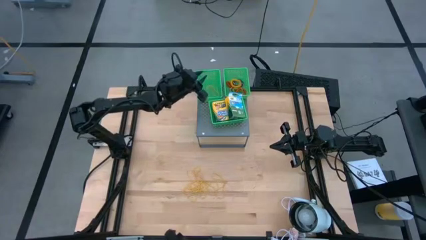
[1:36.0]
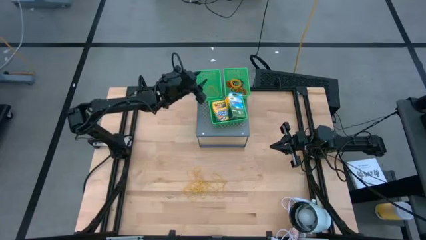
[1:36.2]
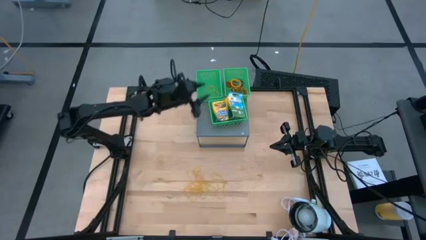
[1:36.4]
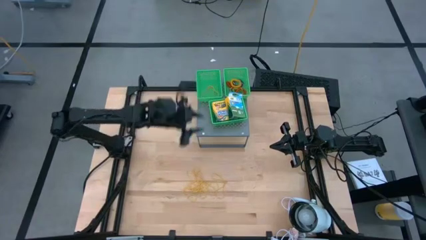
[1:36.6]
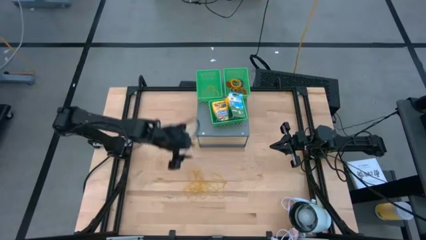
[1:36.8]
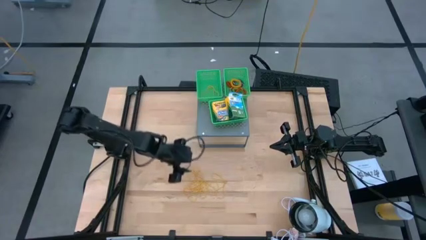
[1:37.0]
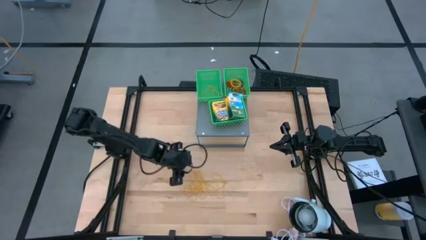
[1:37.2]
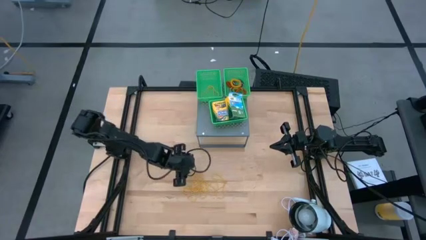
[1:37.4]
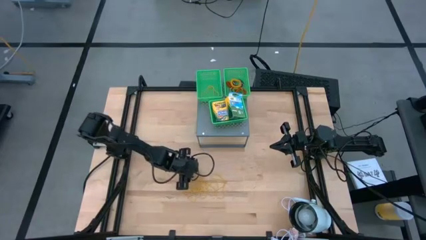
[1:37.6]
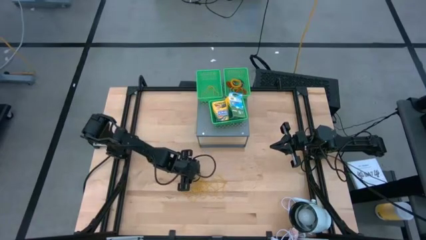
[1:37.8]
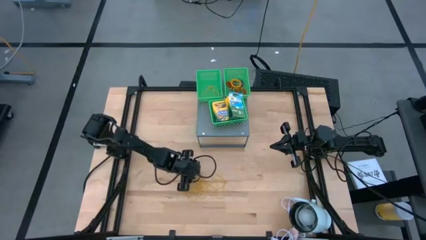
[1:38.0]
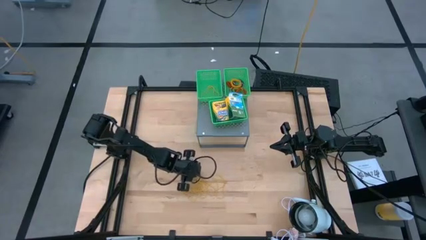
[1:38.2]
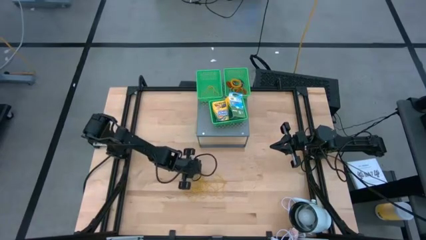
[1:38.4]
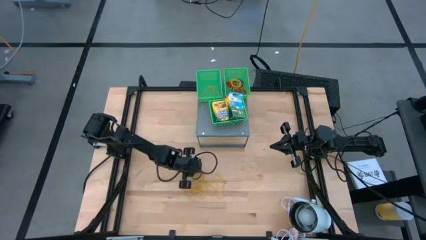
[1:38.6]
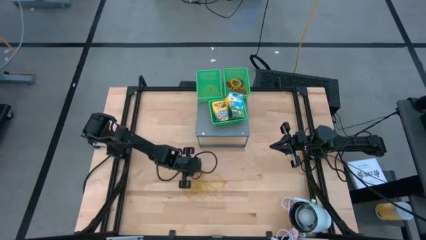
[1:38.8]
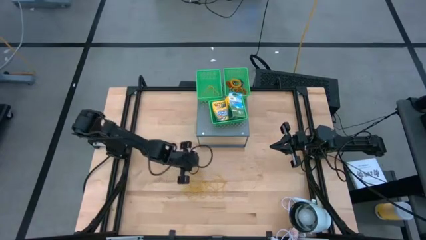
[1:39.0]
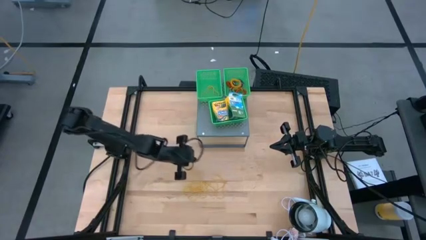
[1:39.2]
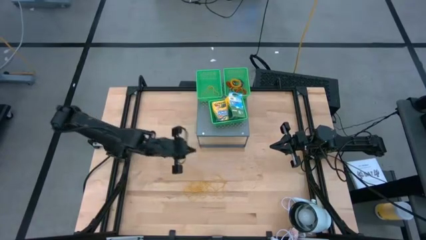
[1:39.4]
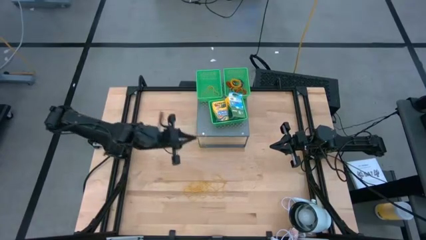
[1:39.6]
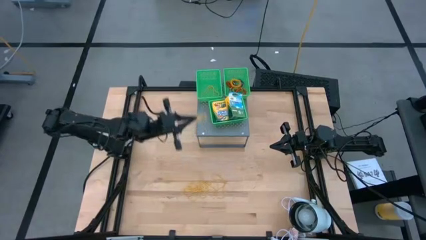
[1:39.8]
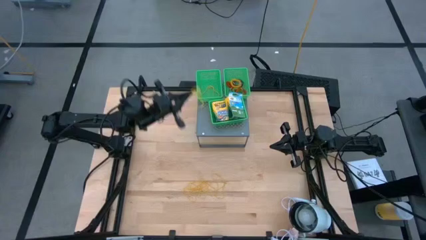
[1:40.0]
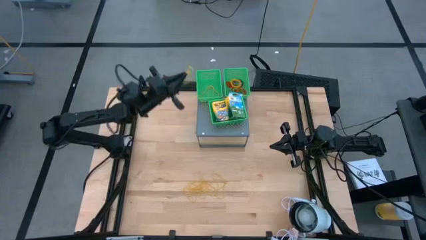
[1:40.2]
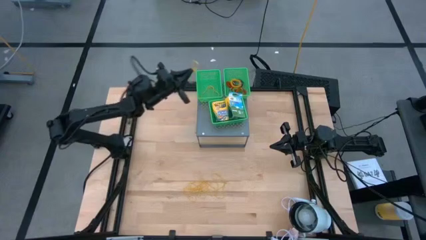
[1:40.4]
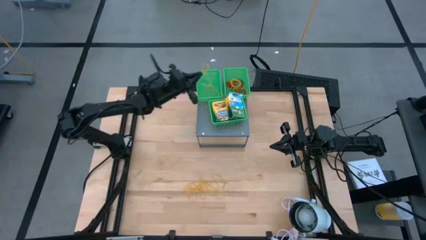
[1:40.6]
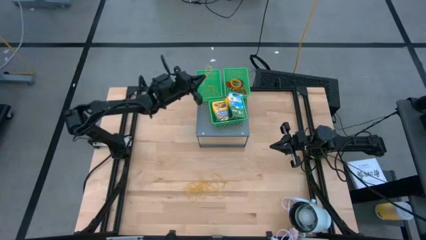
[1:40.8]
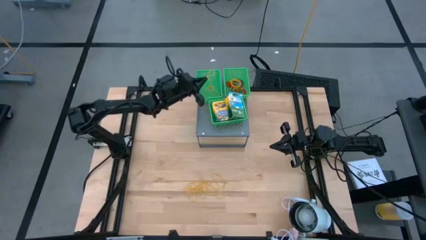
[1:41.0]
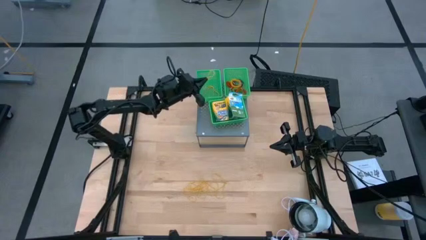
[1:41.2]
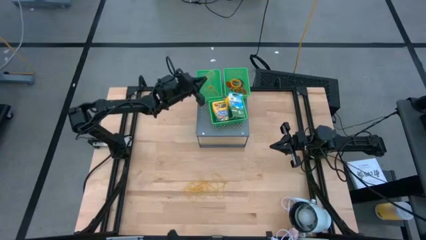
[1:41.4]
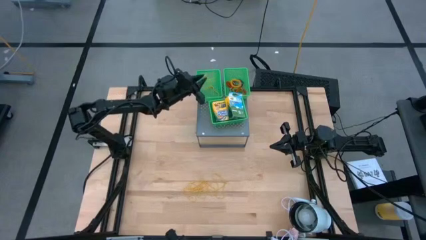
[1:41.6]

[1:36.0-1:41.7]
Task: Pick & Place Office Desk Supplies
Put the yellow rubber band into the left green bin on the shelf

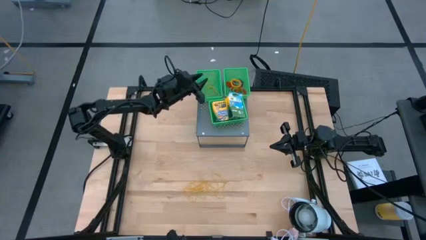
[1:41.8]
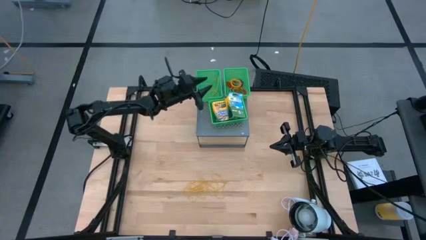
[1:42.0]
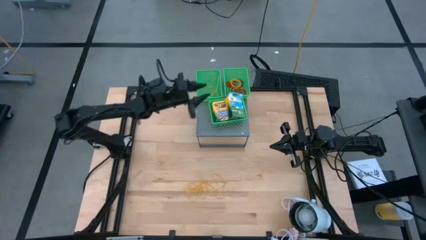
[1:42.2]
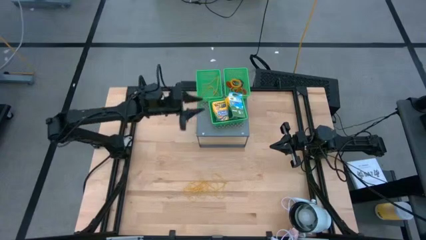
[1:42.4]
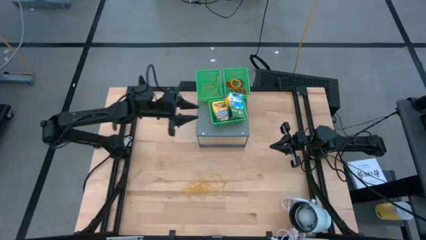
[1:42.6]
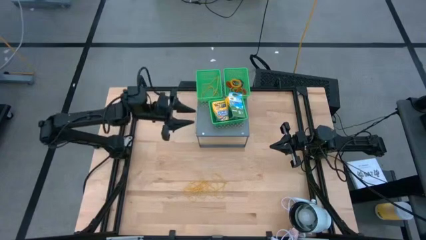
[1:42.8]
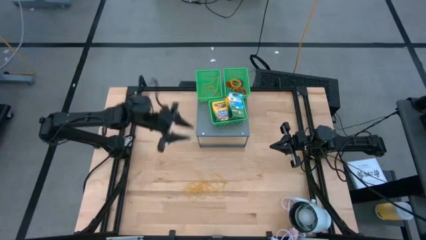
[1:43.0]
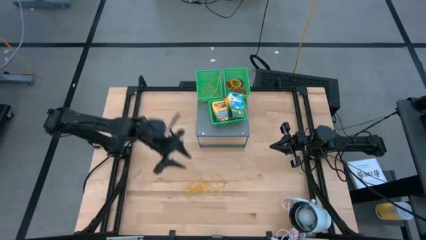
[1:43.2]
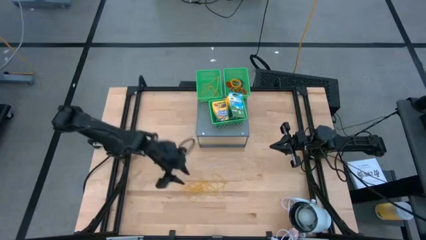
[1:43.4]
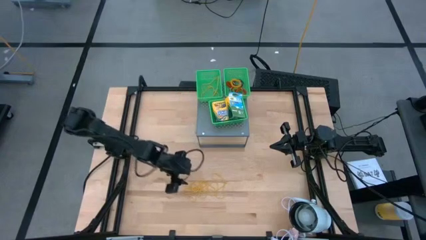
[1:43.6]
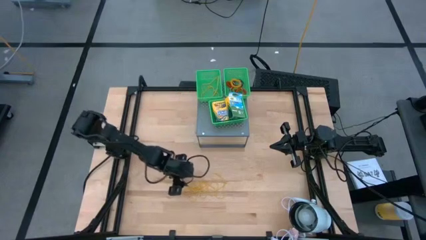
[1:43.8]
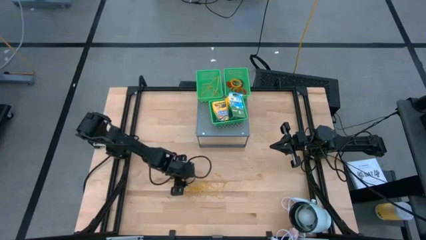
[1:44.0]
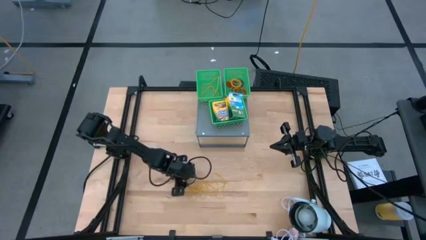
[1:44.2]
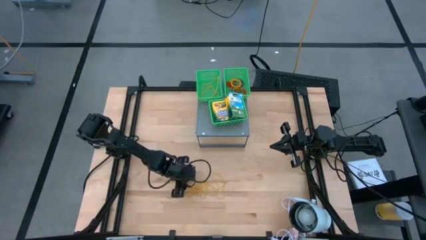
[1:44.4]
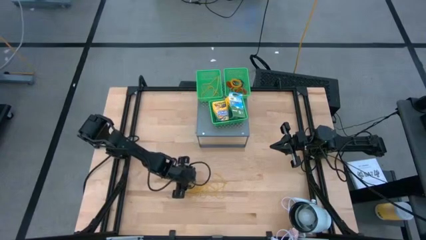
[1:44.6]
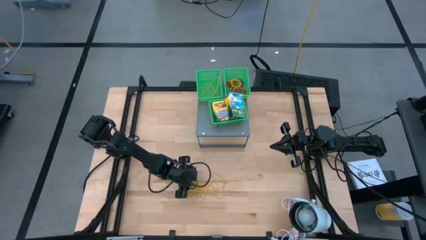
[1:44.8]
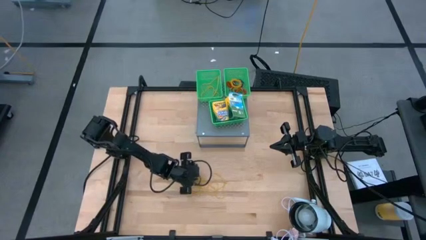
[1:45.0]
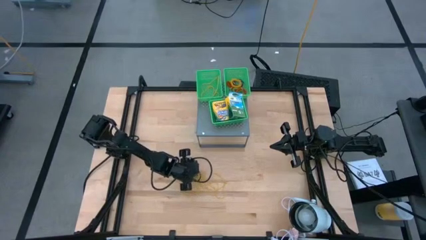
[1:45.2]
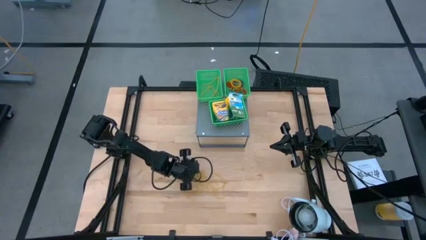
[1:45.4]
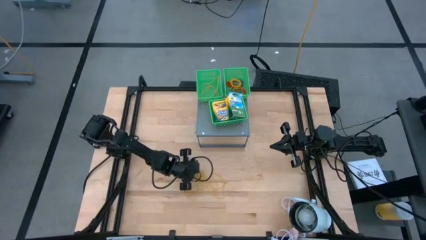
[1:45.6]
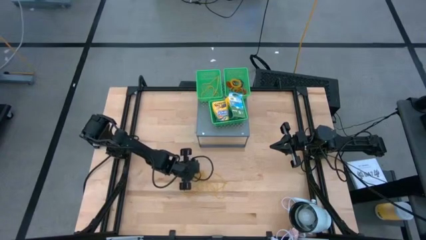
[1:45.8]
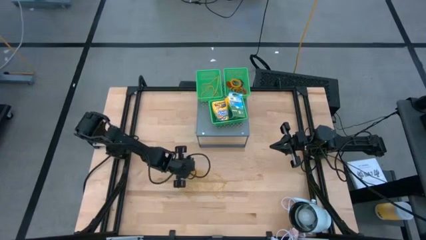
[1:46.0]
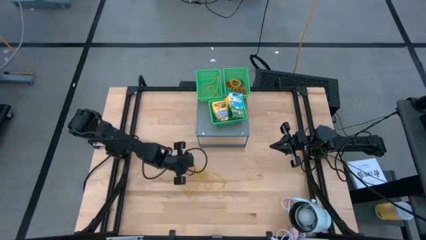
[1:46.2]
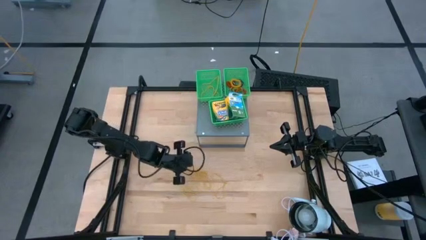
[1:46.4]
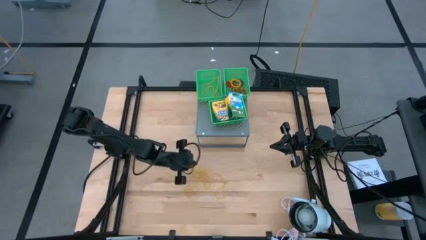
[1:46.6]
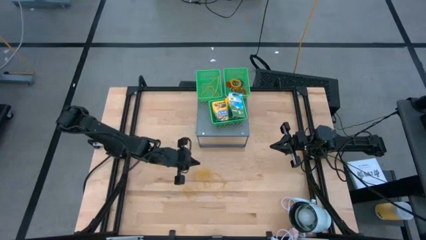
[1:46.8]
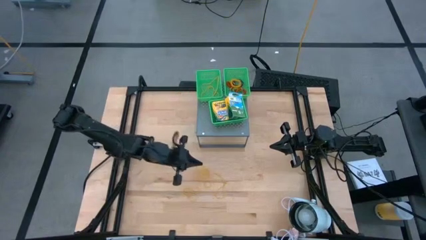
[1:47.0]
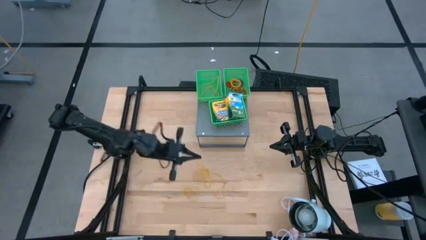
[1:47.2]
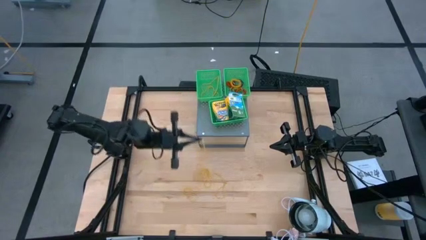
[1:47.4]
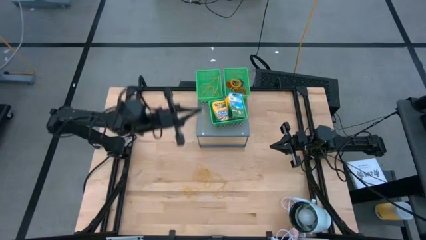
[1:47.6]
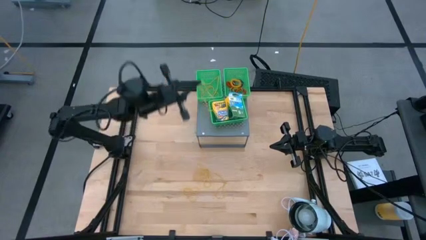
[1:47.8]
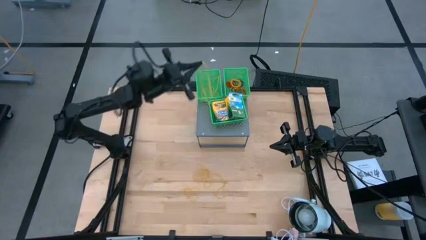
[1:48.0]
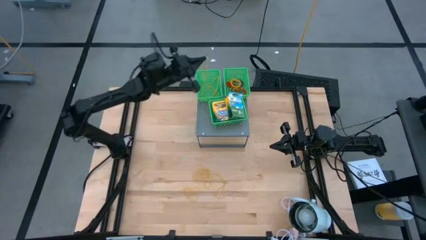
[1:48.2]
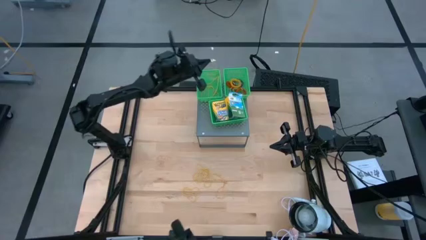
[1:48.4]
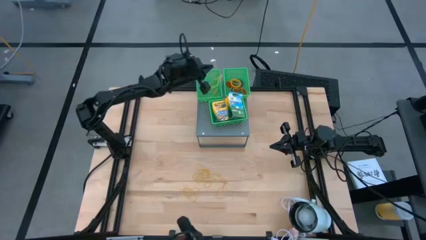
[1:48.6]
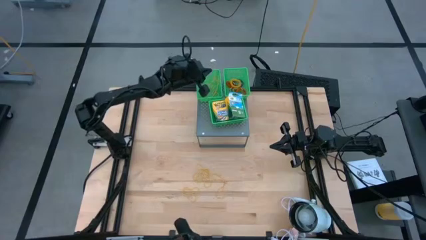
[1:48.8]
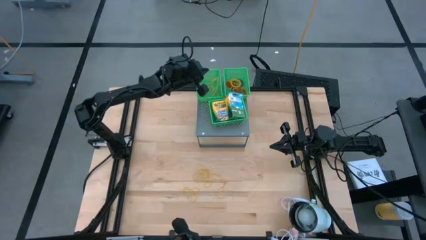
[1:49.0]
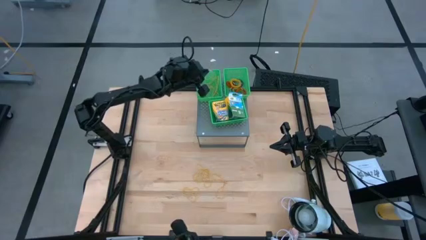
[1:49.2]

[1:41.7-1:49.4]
Put the yellow rubber band into the left green bin on the shelf

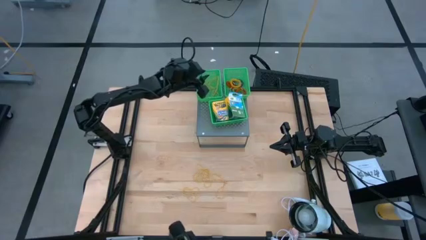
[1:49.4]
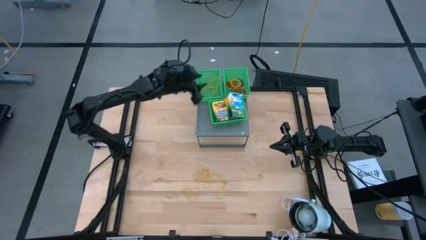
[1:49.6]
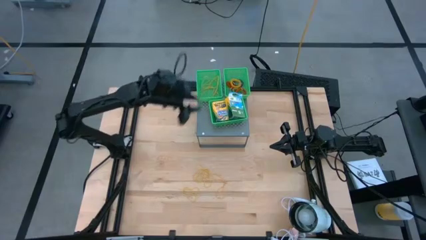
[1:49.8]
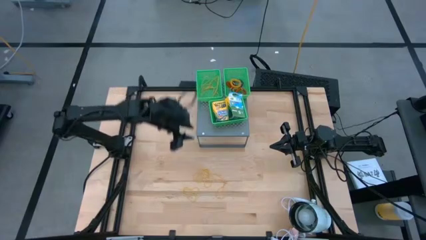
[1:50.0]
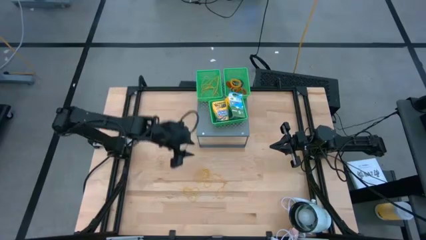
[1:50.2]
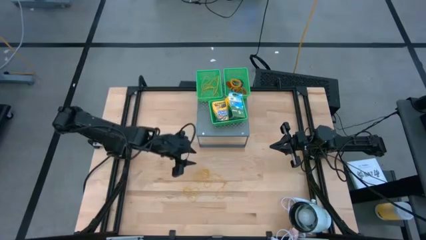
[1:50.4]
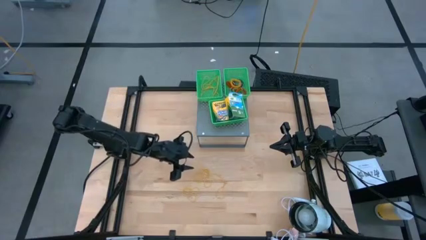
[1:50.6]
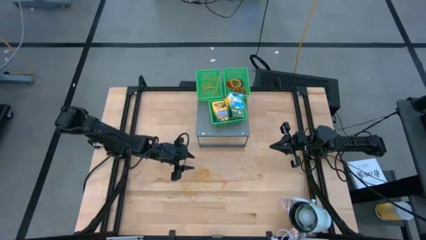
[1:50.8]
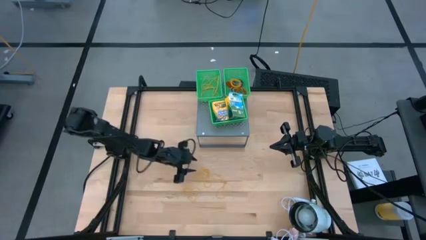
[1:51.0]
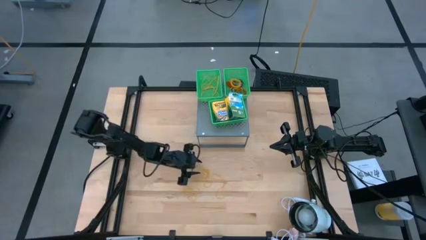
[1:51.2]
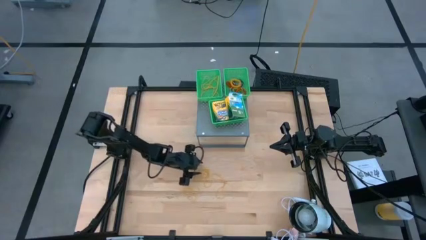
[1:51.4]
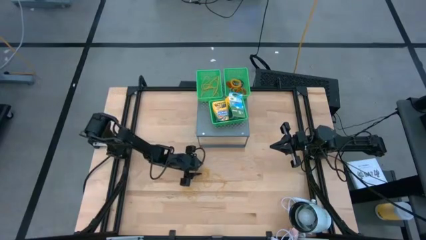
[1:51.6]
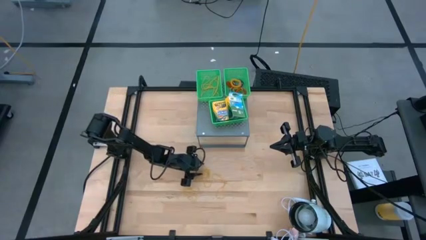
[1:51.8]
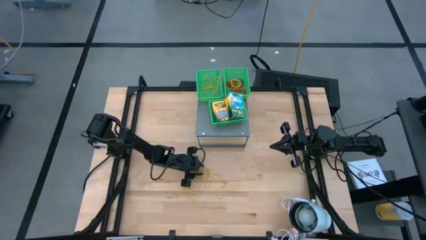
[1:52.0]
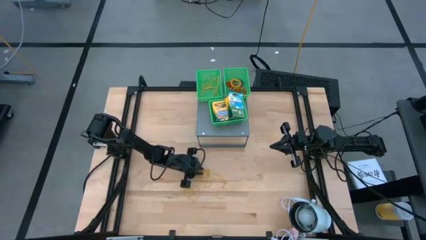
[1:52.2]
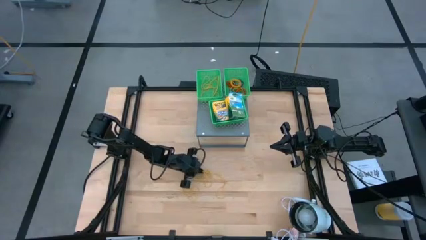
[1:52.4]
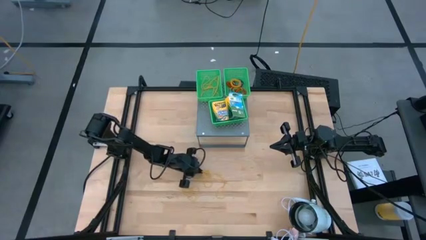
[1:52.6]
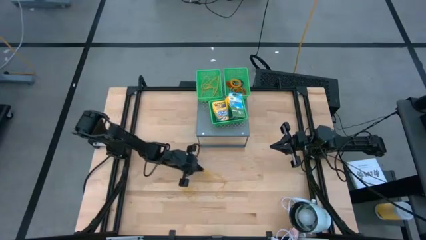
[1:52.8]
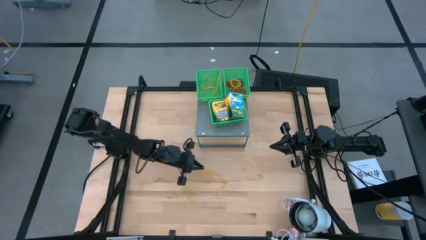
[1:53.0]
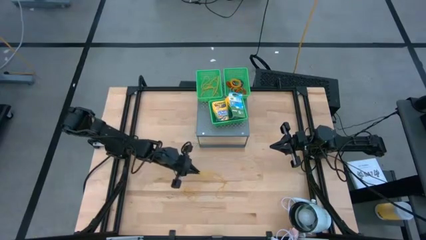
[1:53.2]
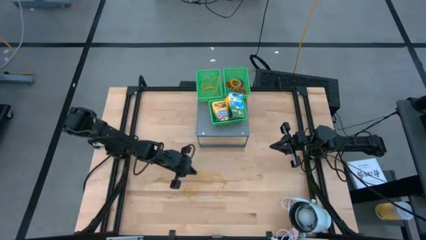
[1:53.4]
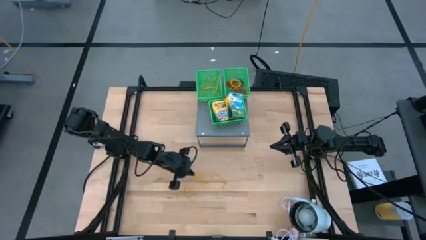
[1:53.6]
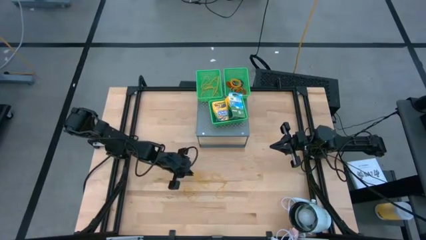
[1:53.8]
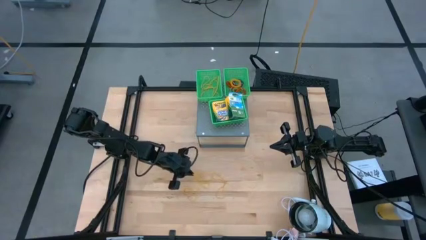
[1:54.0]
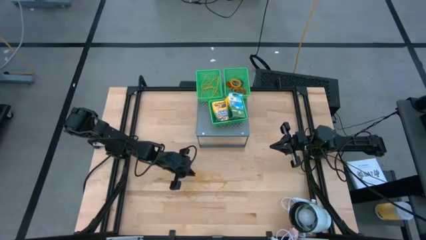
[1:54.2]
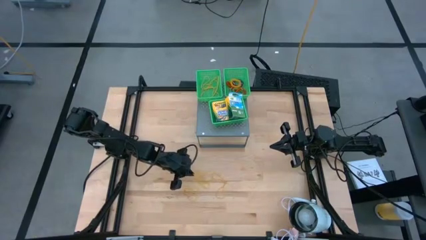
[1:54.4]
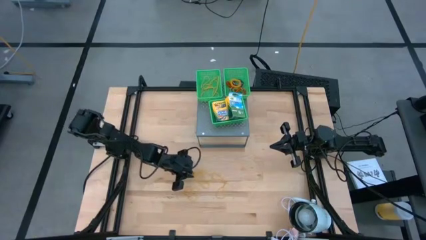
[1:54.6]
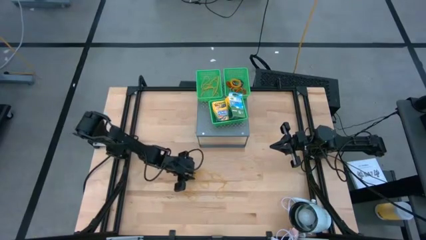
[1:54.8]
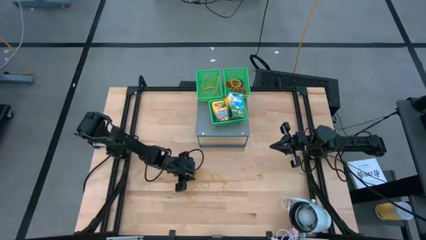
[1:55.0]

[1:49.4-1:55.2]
Put the yellow rubber band into the left green bin on the shelf
